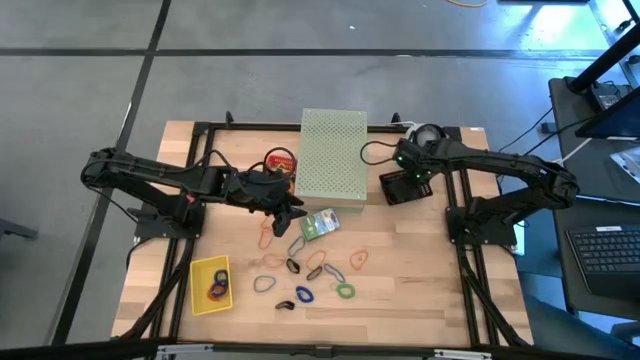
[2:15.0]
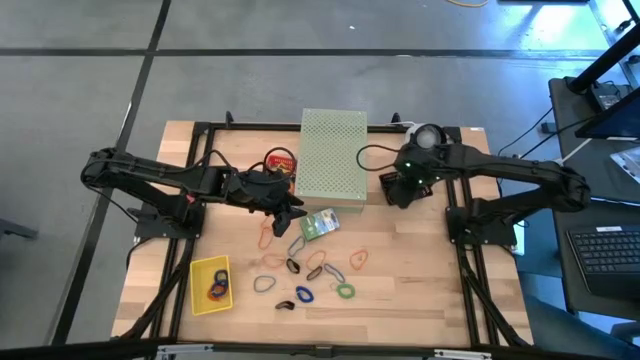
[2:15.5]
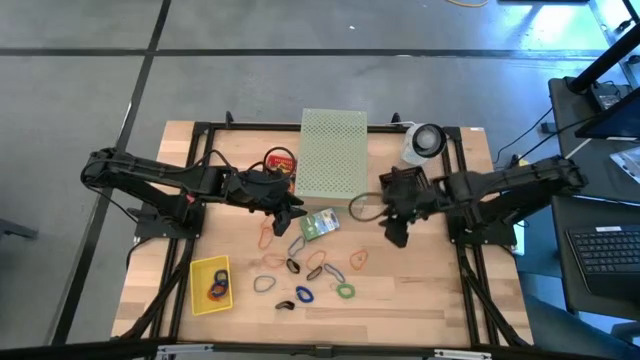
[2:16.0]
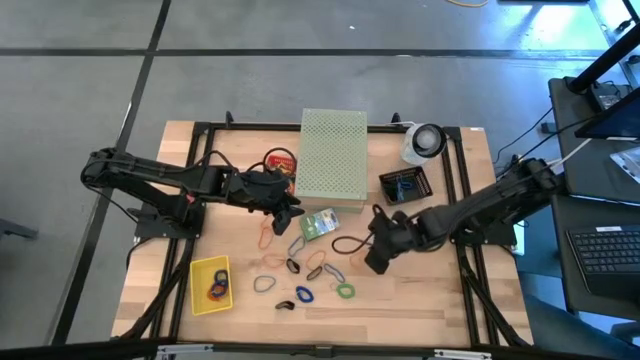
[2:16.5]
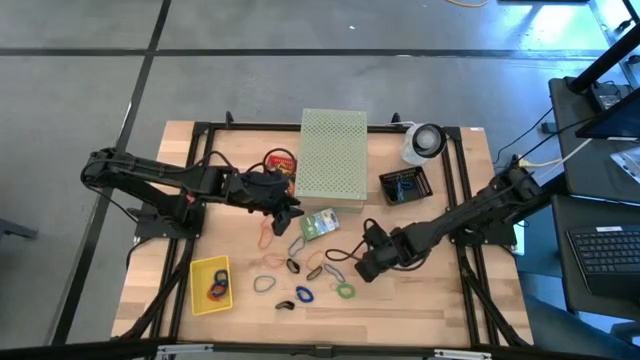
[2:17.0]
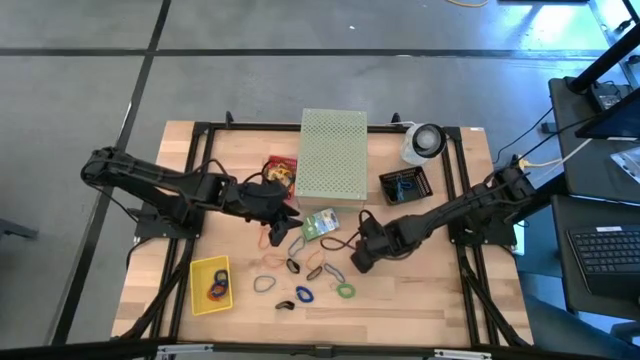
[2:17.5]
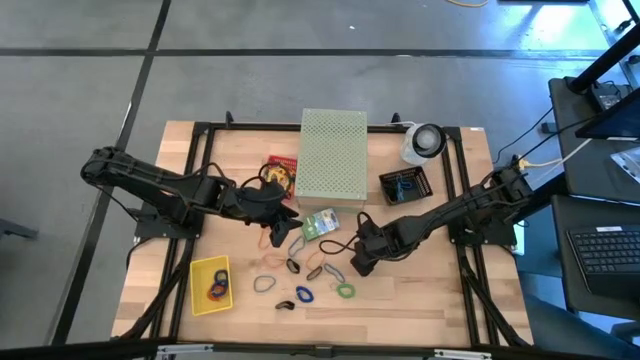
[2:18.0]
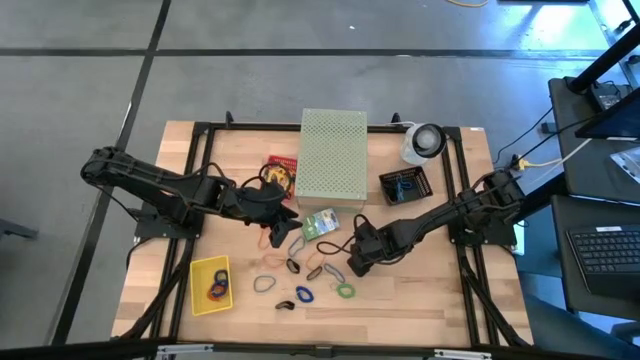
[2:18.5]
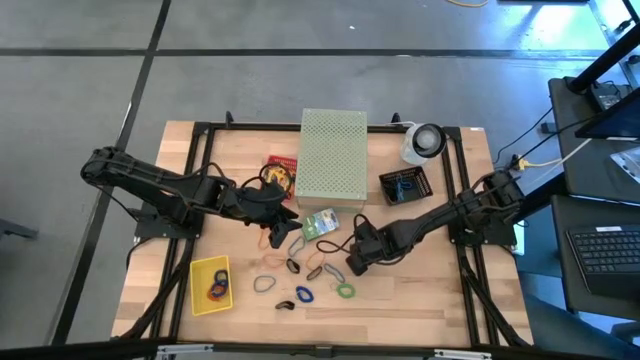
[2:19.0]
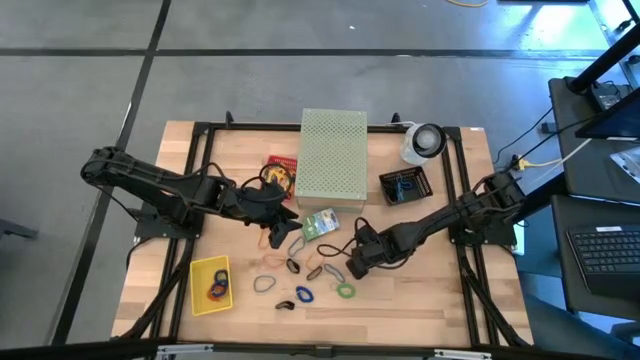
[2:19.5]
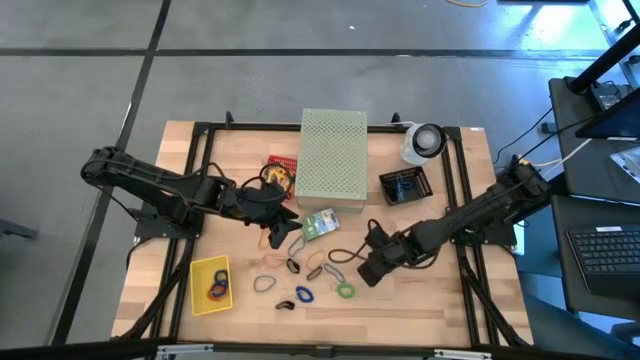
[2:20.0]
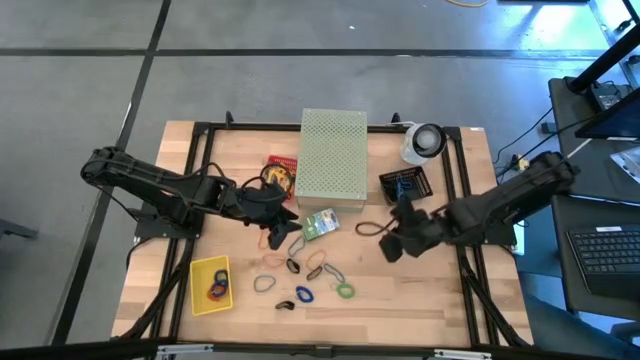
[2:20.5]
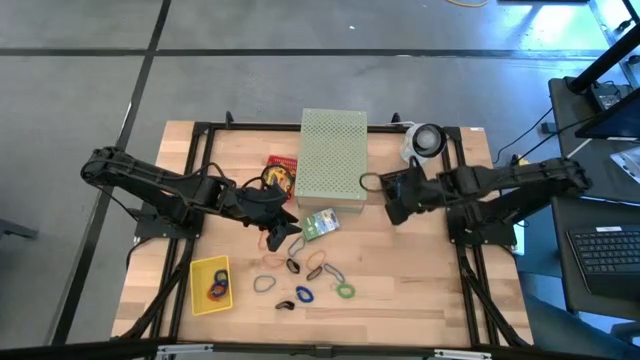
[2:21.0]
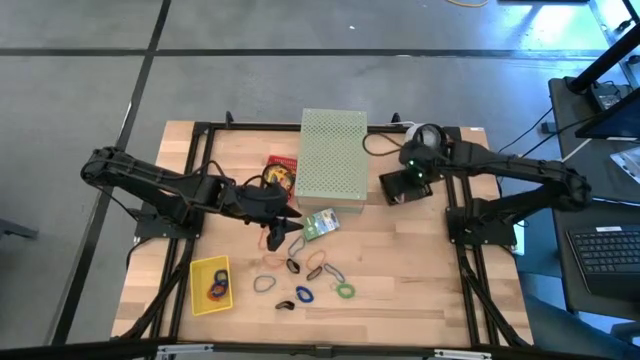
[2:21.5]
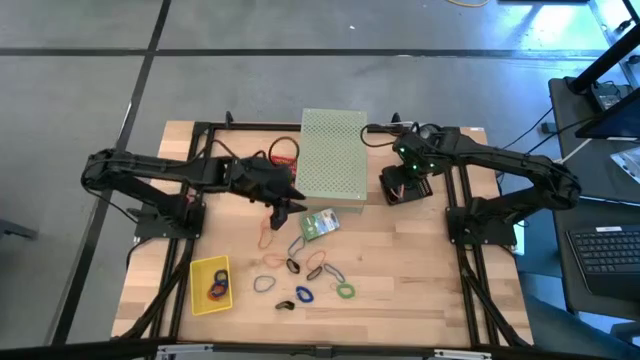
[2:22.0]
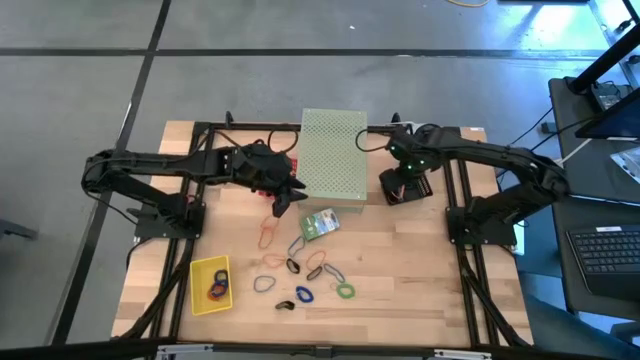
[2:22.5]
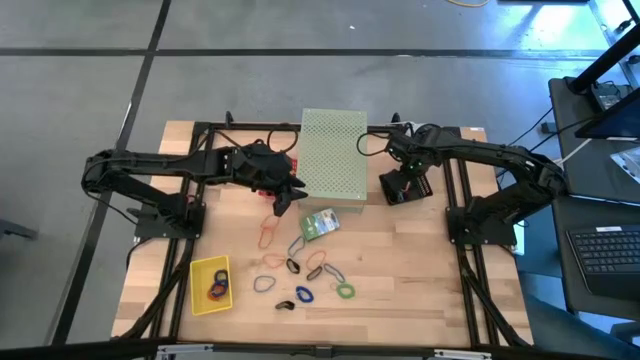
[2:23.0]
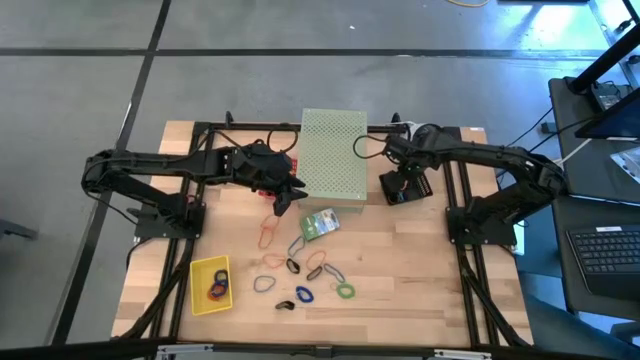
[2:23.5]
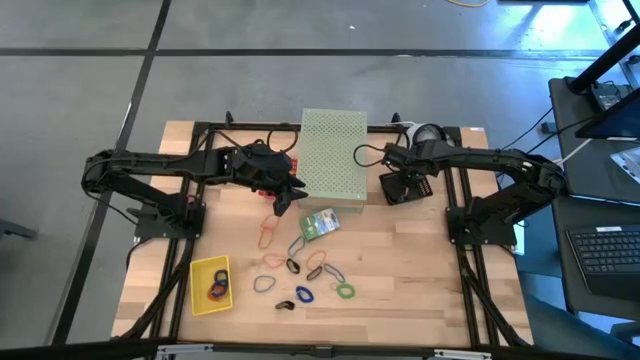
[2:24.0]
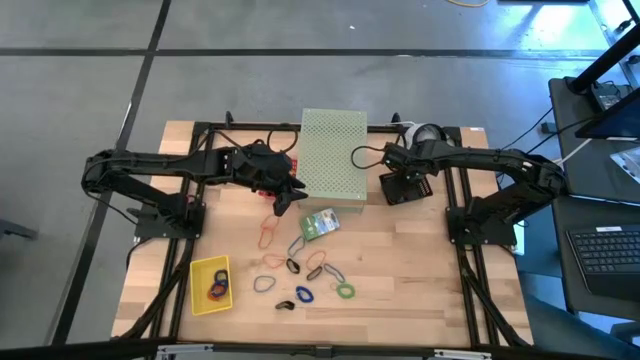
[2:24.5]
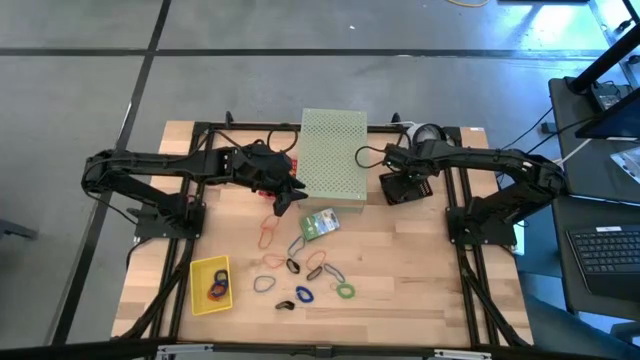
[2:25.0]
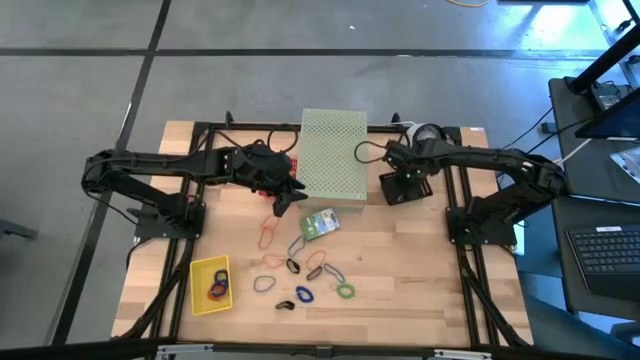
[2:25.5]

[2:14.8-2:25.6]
Task: Pick & Place Office Desk Supplies
Put the orange rubber band into the black bin

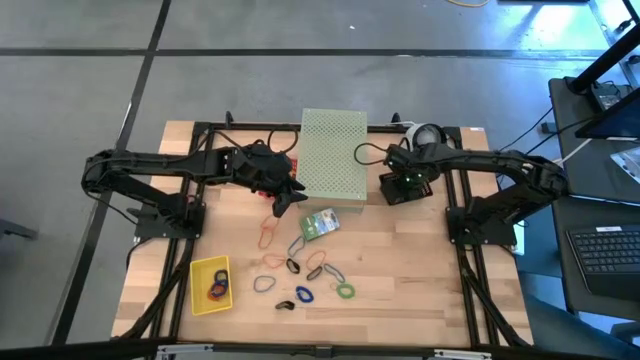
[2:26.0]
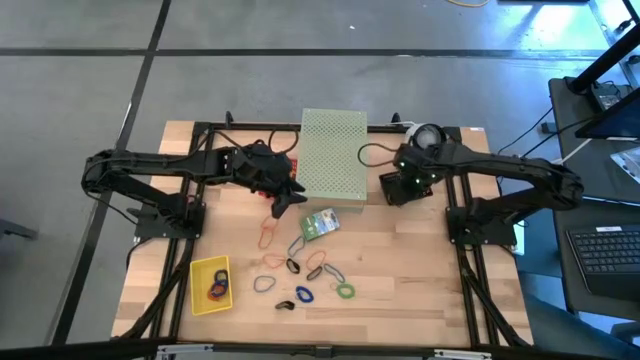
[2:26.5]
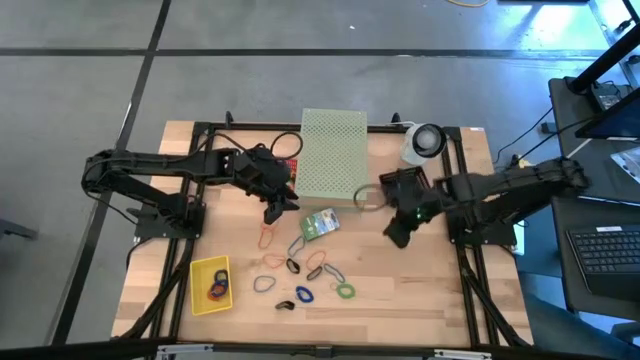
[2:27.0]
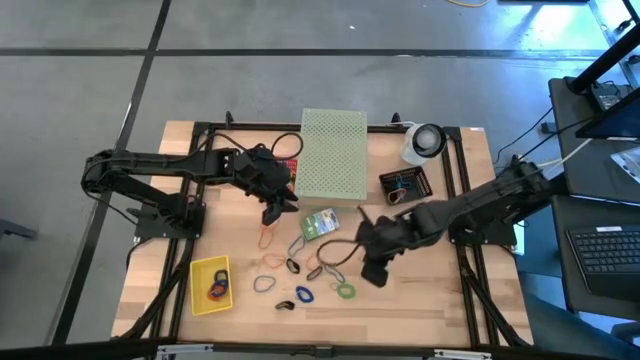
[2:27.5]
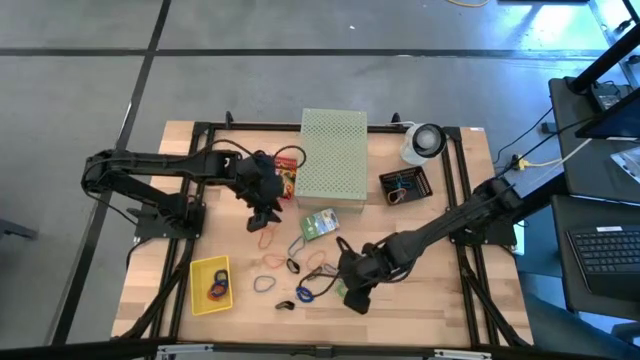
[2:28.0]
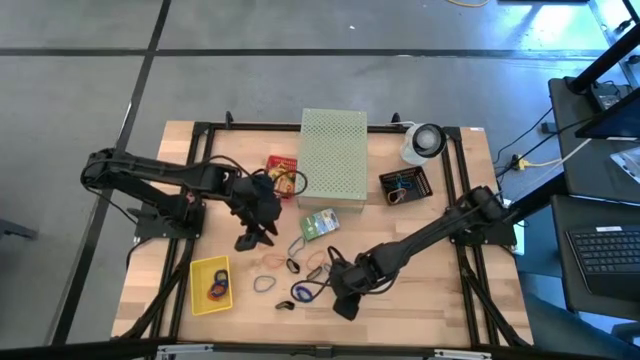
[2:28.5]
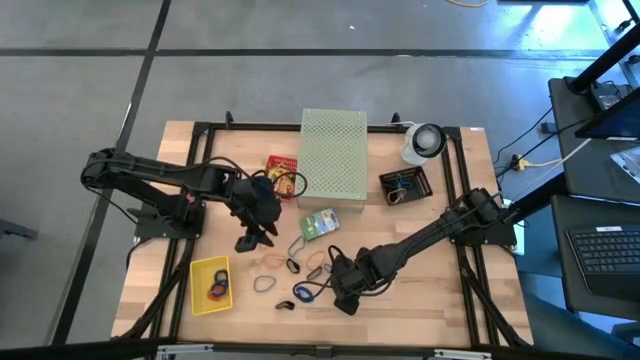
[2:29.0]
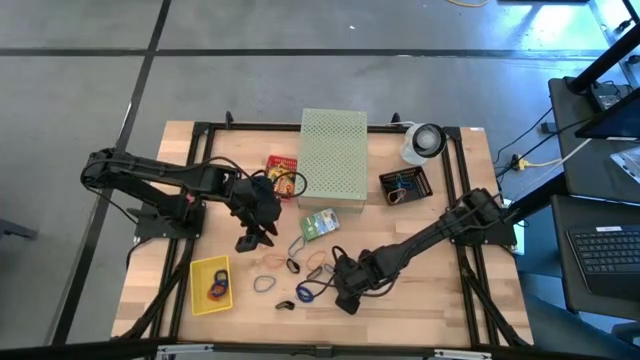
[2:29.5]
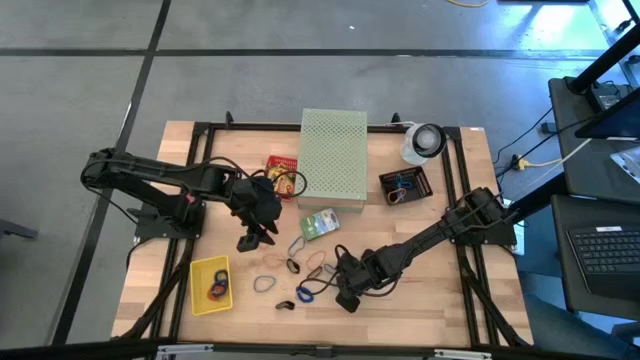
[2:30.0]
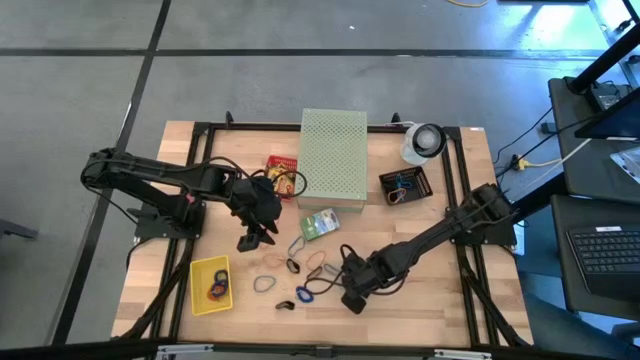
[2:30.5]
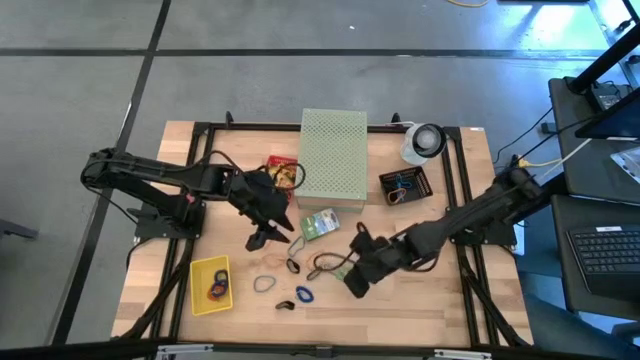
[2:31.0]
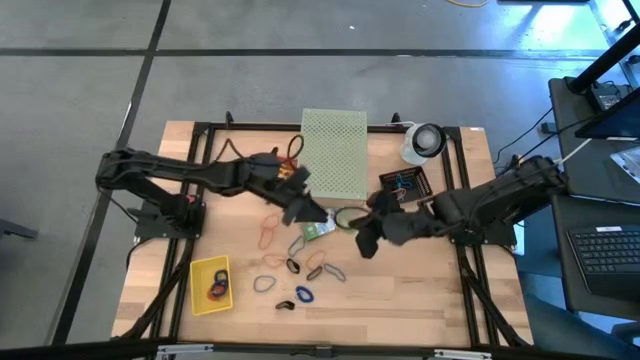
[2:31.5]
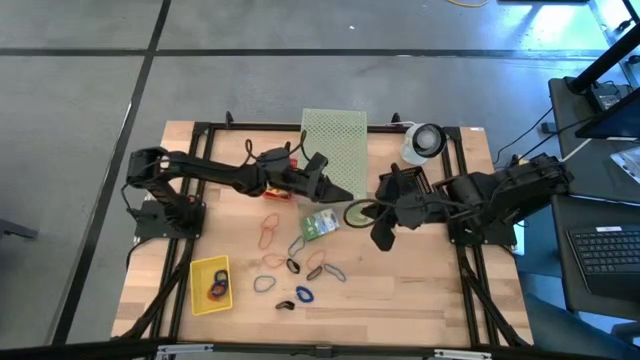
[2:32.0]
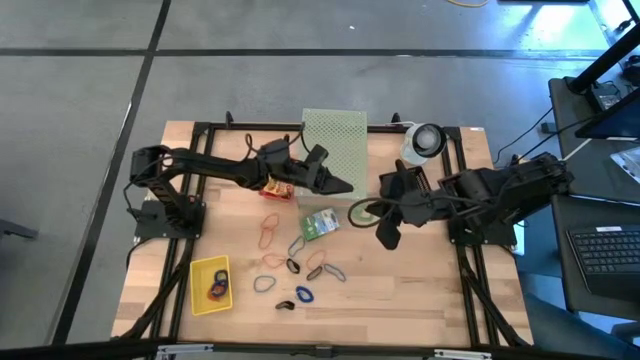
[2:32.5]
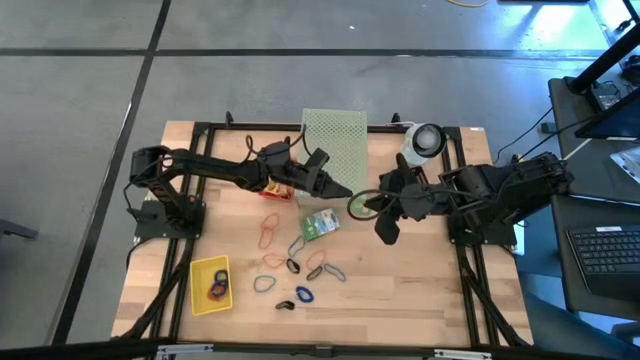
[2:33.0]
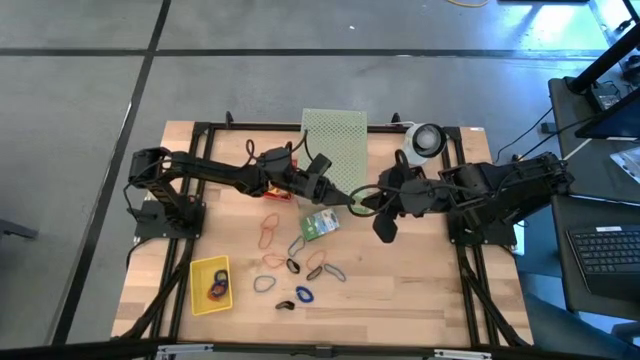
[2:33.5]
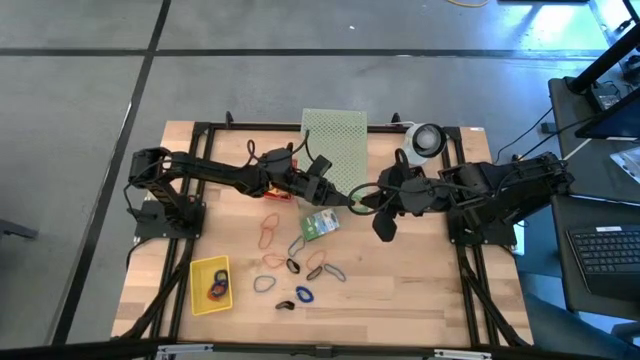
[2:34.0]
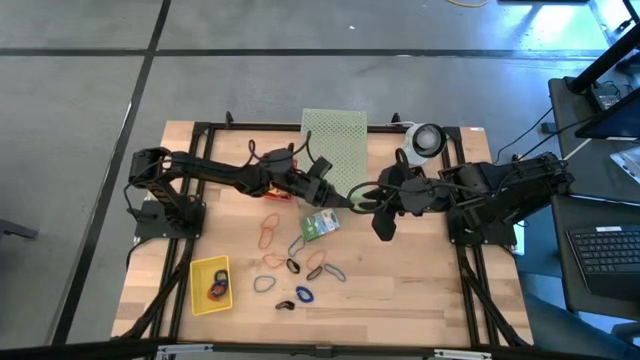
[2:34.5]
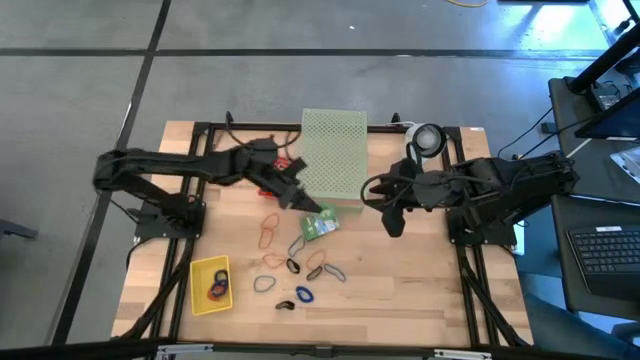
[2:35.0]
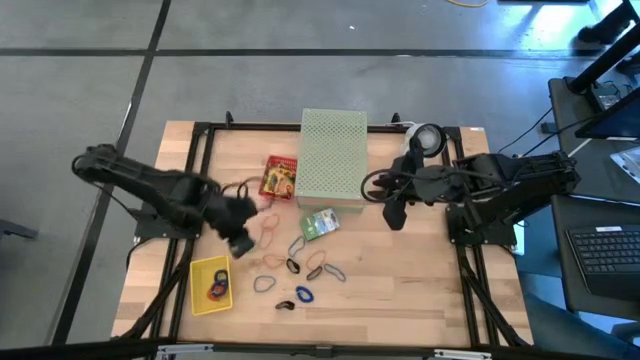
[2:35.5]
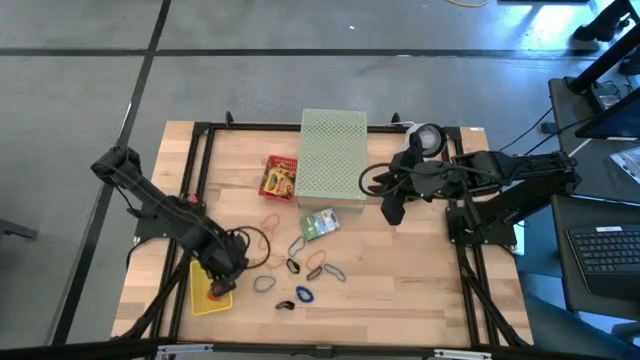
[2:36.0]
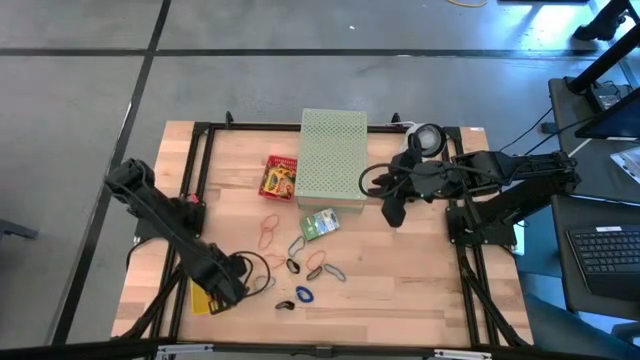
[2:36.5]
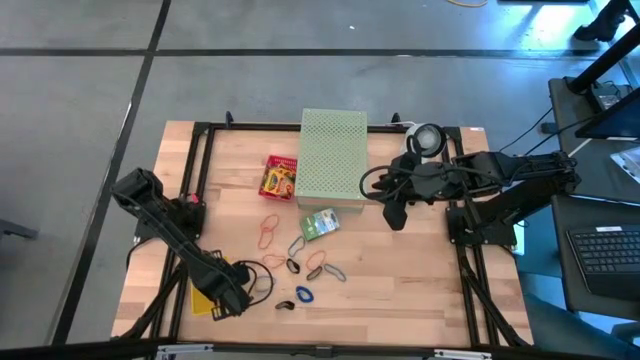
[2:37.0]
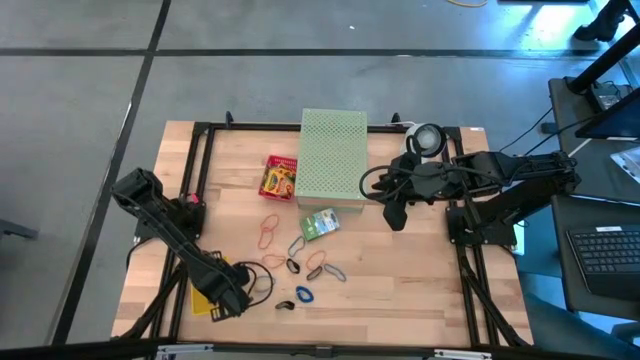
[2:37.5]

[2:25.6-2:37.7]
Put the green spring rubber band into the yellow bin
